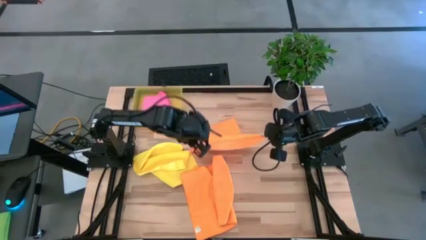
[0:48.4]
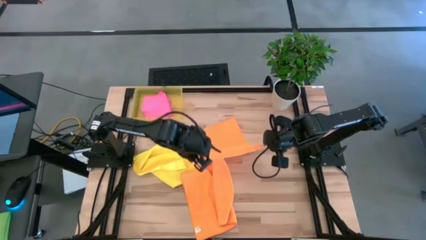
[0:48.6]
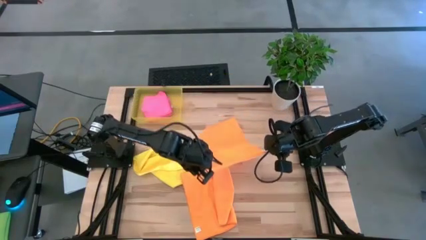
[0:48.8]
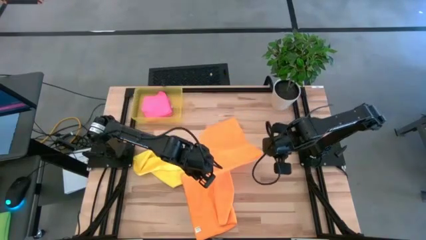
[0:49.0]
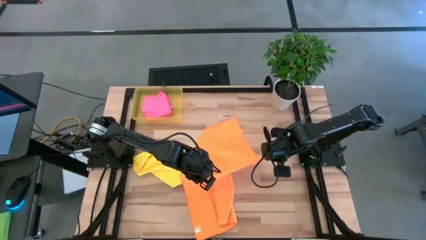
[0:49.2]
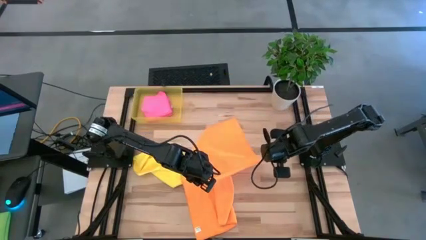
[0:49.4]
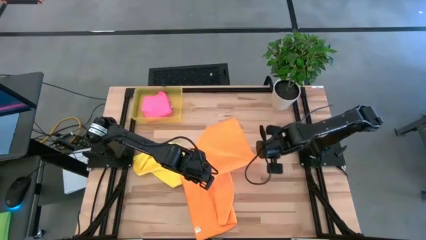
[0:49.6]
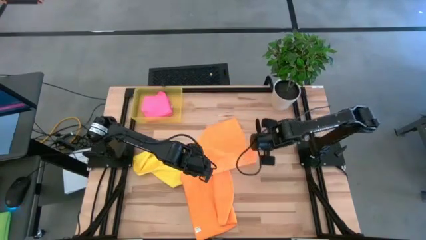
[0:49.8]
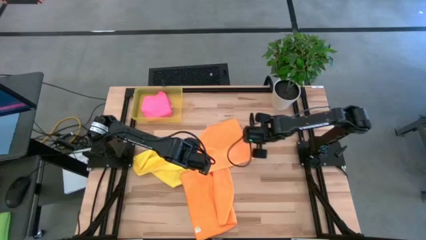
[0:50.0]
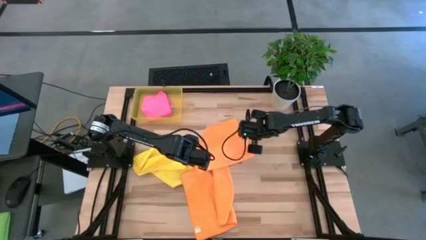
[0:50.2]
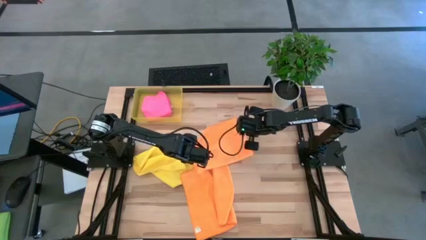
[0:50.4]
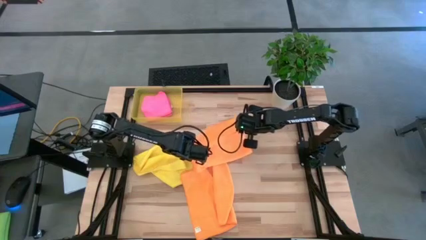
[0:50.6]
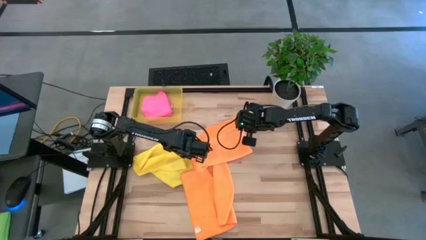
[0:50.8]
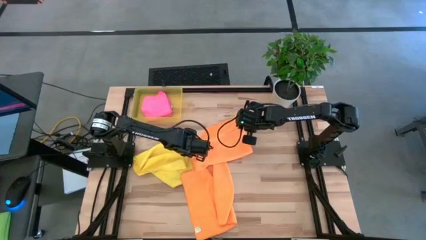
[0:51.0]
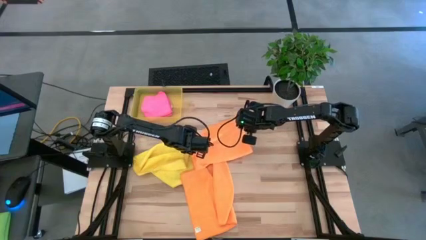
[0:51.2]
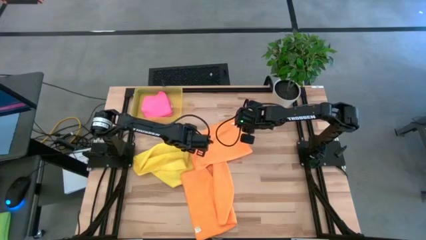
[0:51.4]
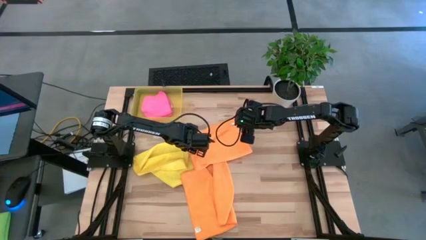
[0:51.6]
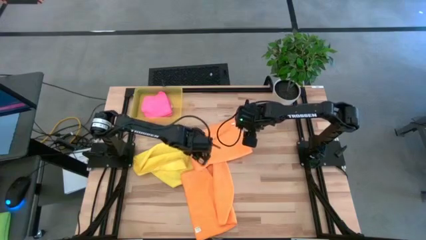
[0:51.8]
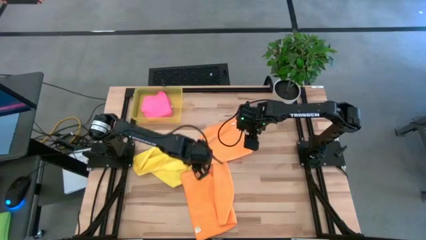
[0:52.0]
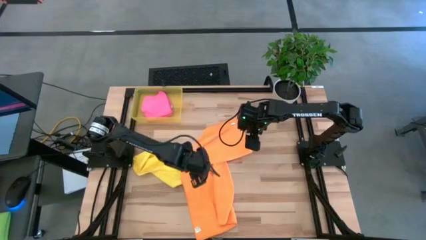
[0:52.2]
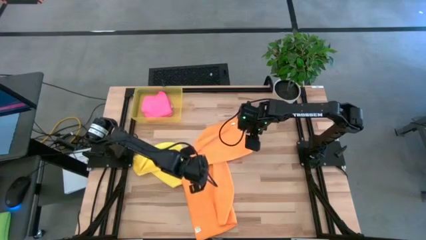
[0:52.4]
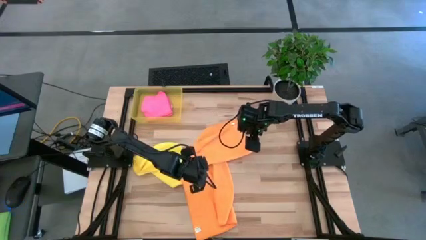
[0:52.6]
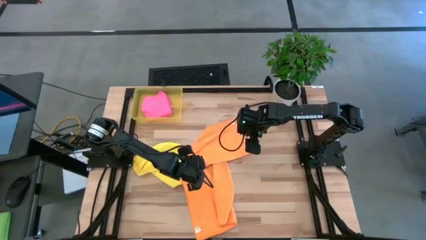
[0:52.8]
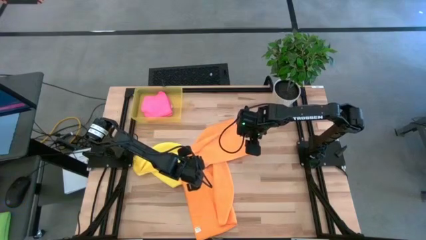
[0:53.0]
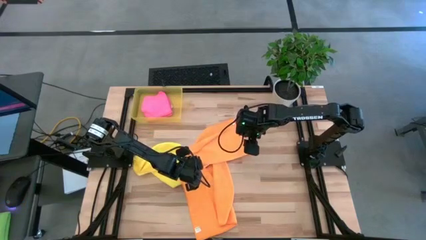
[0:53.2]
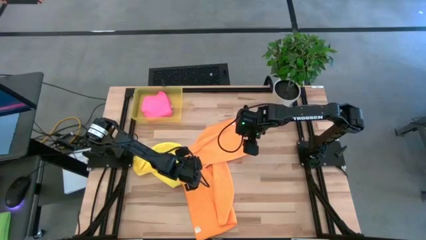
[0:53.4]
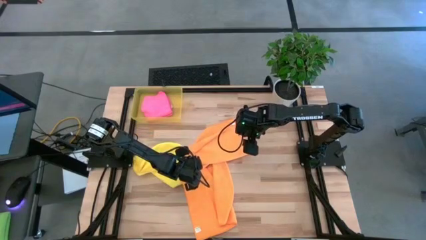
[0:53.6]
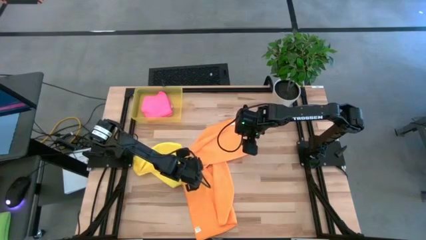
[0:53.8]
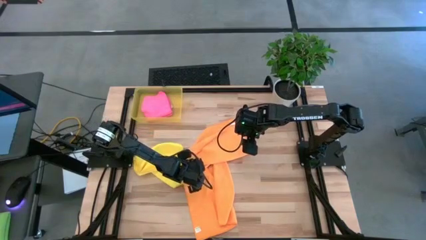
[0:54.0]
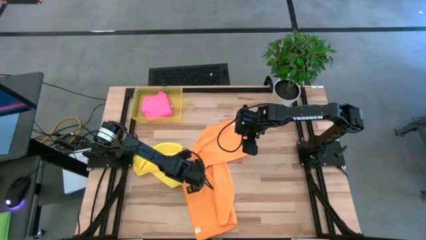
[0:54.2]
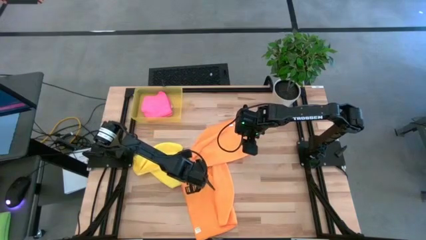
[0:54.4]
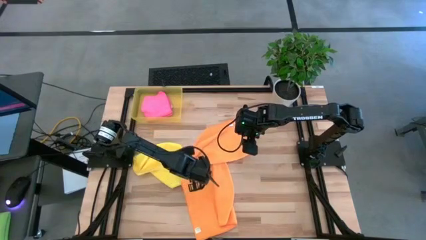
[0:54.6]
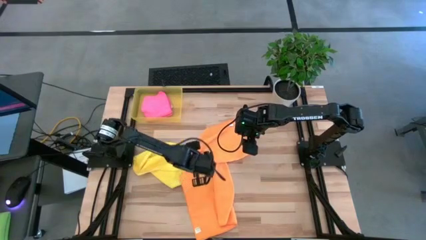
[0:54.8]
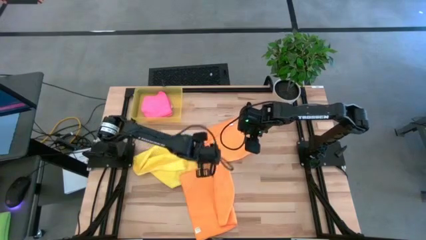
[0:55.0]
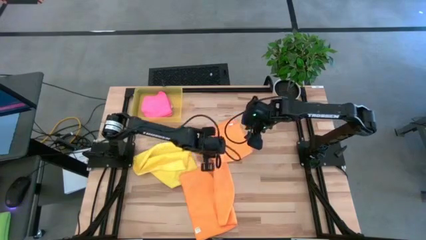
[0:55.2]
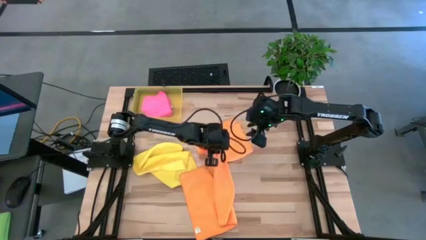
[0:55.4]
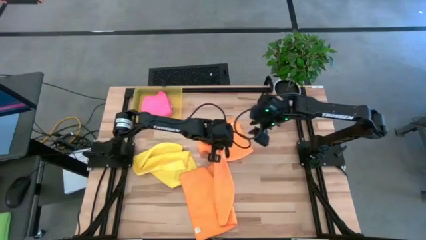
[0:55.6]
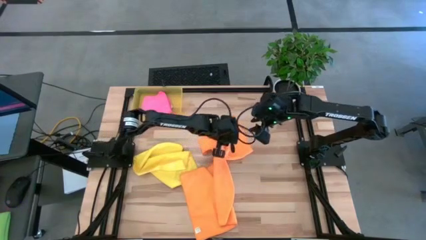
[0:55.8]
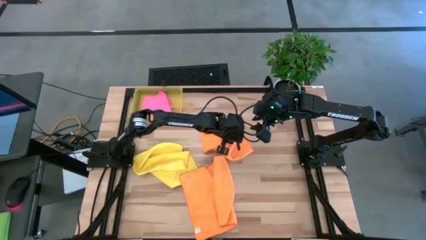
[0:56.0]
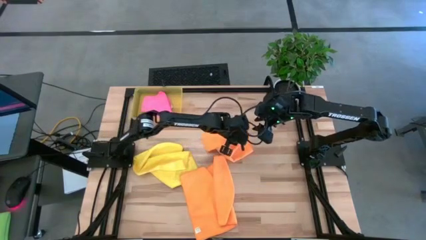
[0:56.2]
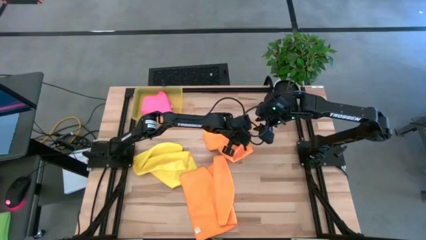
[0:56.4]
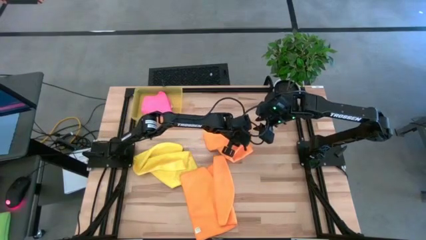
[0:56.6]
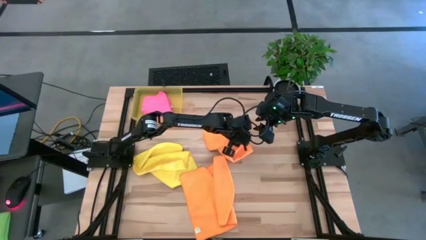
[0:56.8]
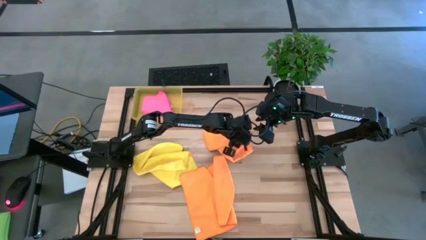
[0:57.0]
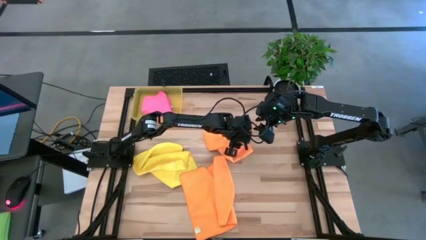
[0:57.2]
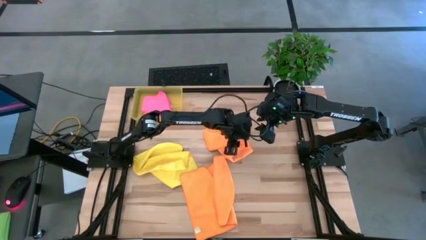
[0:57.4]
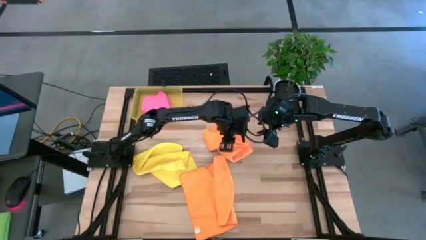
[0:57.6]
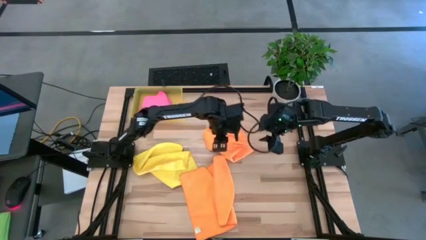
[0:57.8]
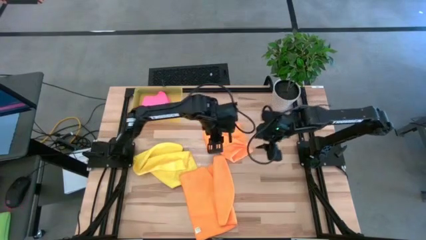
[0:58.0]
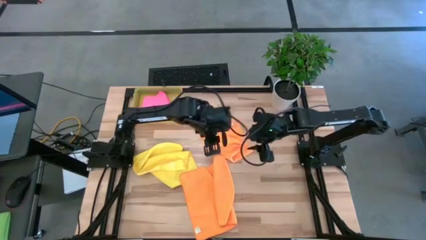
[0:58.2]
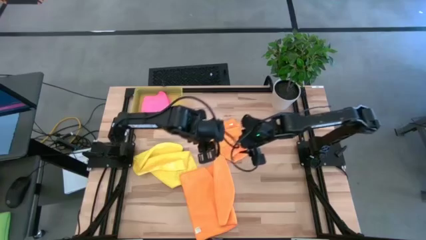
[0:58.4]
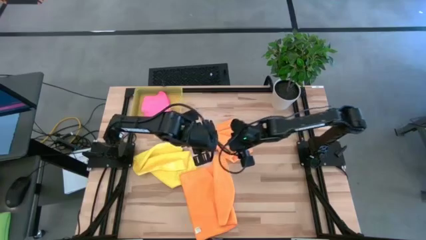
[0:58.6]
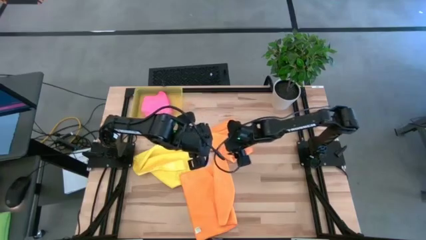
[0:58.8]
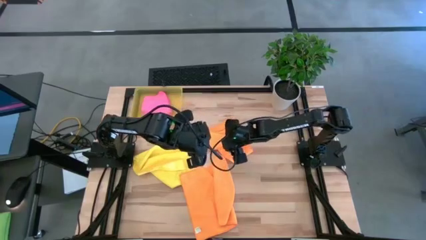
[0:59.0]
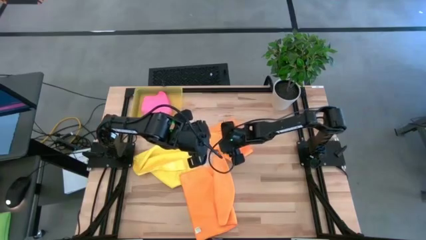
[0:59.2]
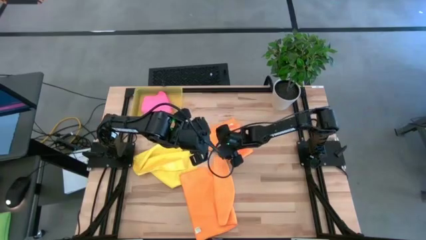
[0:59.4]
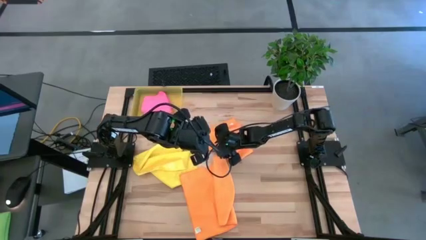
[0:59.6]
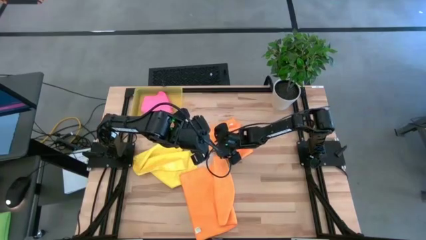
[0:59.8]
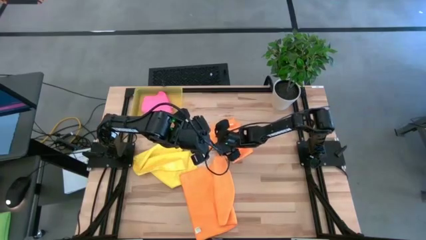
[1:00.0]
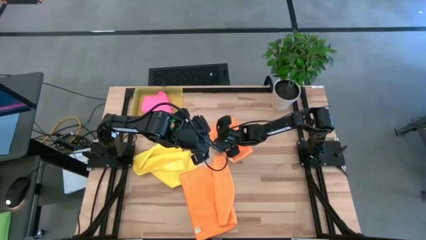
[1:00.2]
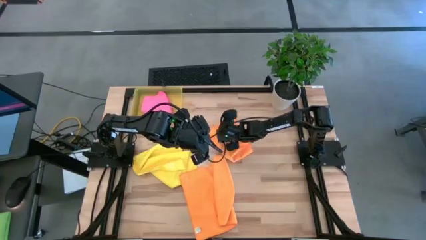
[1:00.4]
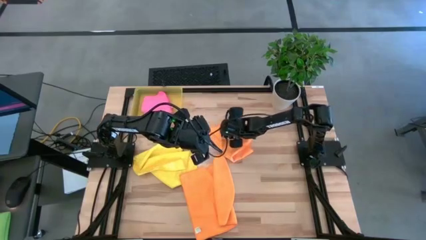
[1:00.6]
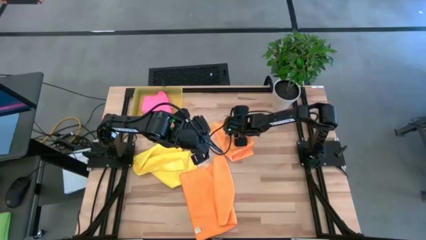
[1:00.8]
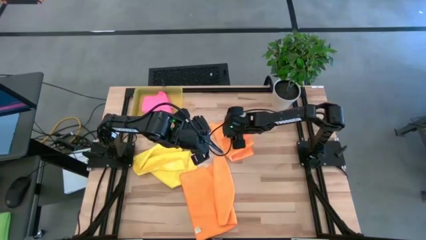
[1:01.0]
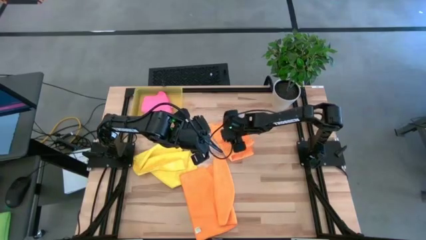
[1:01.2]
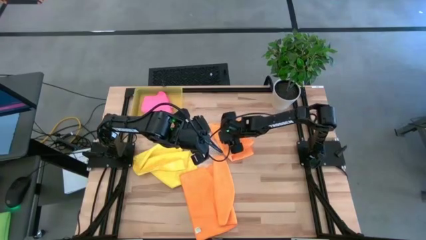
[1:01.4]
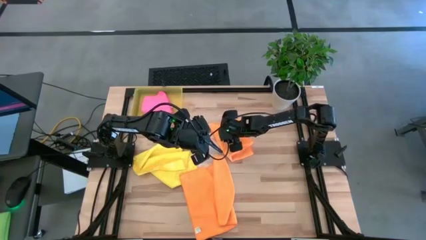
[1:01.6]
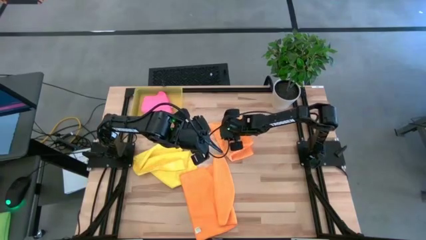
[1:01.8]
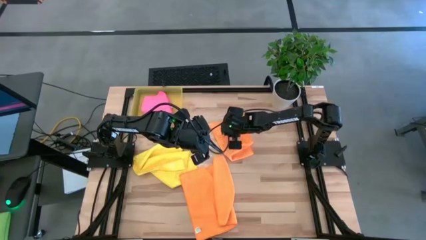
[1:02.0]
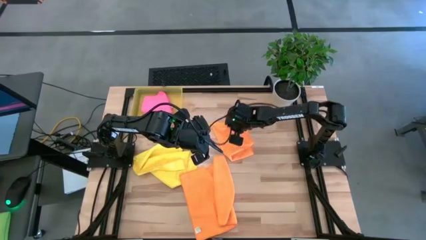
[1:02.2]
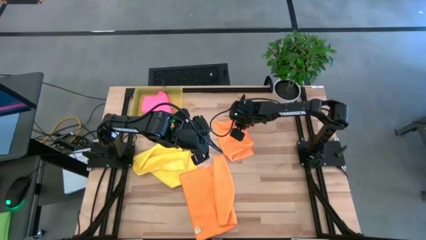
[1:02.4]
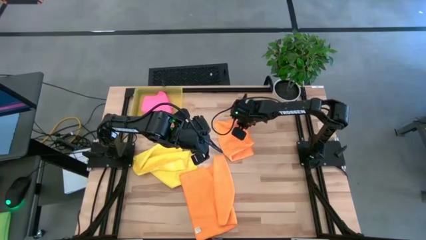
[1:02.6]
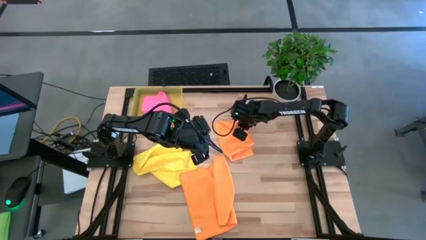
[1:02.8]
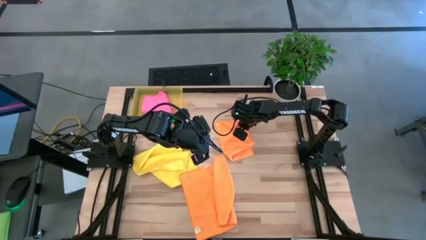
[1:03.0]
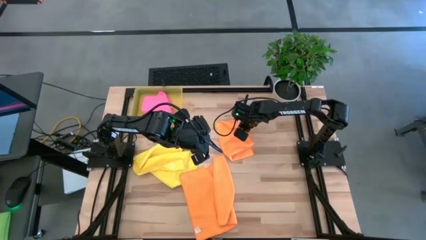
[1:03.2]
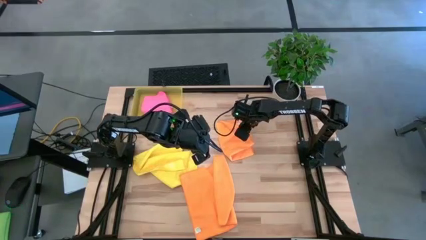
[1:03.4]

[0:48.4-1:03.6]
Task: Fold microfiber towels
Fold the right orange microfiber cloth

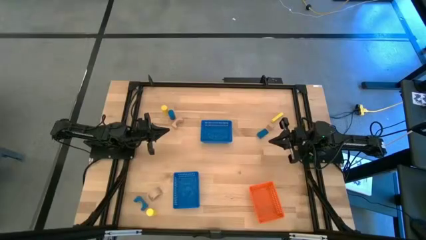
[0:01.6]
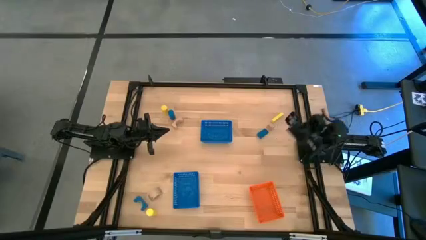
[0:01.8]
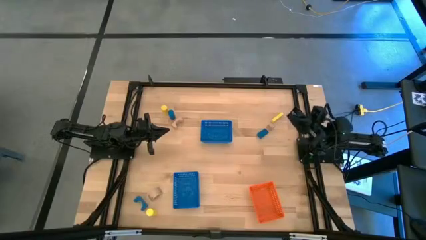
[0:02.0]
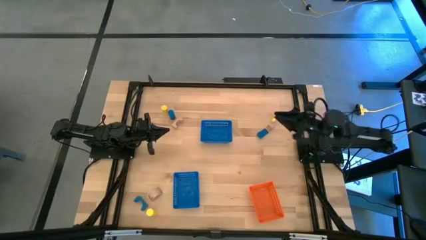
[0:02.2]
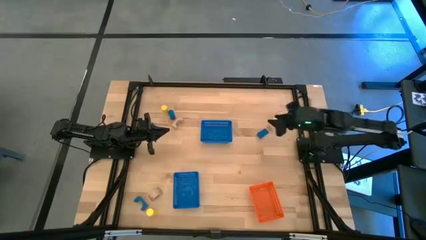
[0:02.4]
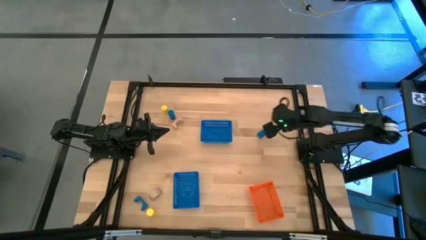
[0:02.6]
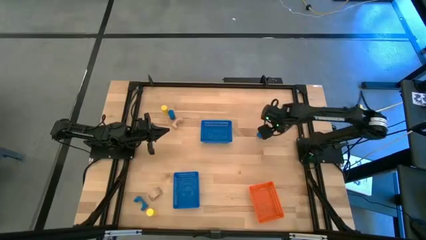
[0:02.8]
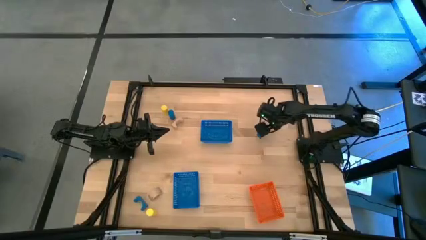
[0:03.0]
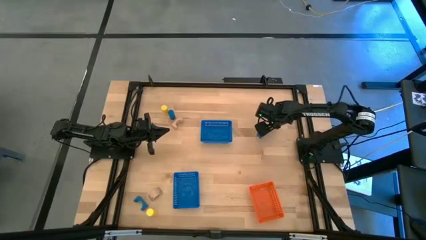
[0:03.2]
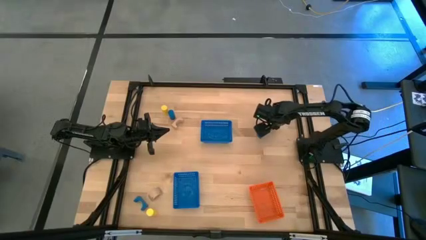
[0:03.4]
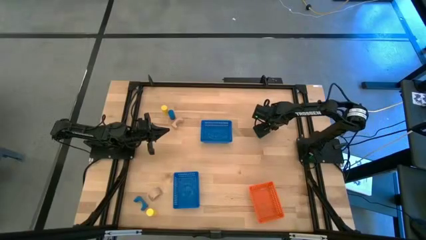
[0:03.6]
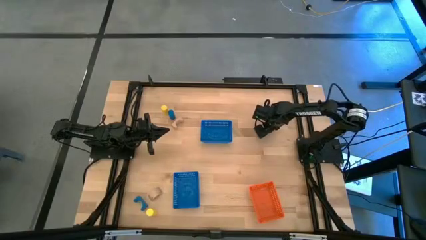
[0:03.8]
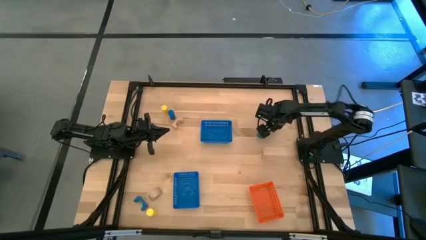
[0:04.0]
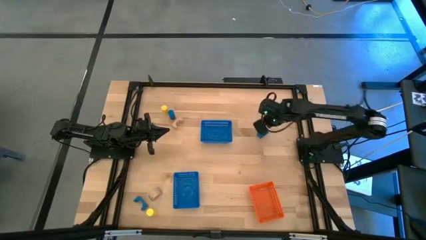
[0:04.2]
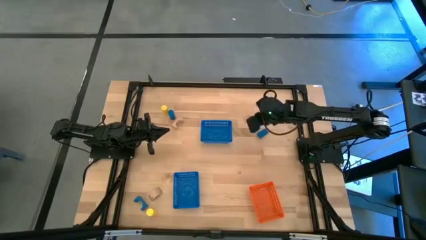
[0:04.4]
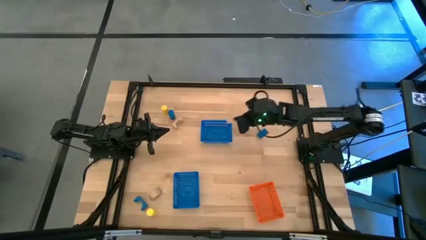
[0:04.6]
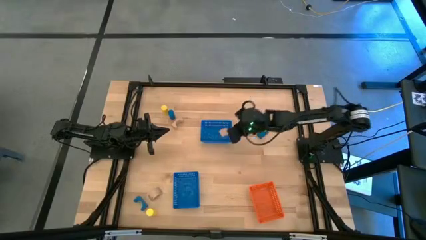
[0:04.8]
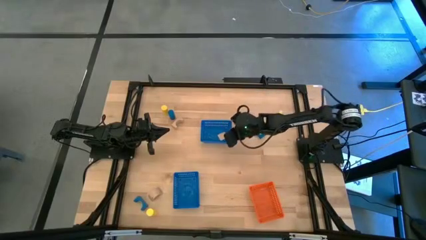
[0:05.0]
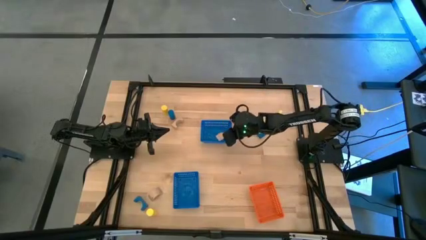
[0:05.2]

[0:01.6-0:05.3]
Task: Sort & place blocks by color
Put the top right brown block into the top blue basket
